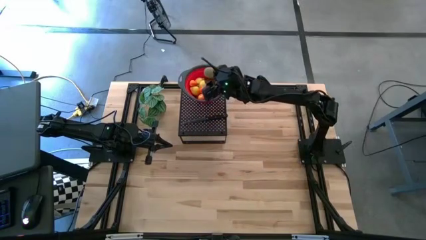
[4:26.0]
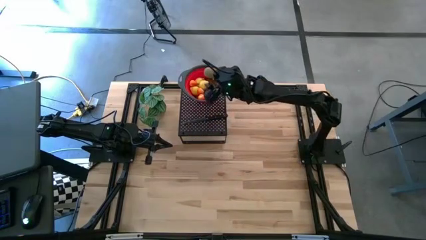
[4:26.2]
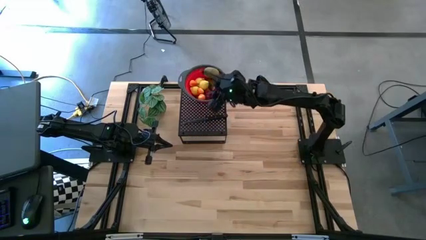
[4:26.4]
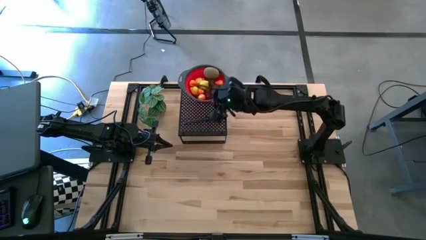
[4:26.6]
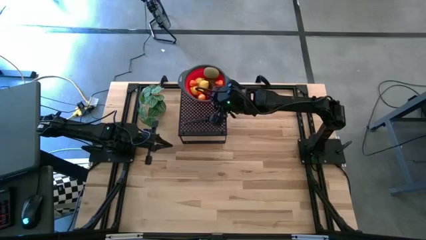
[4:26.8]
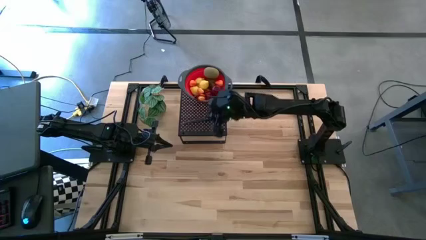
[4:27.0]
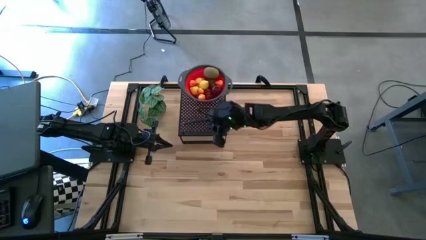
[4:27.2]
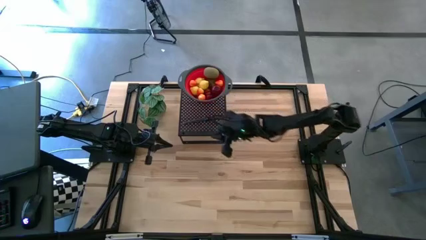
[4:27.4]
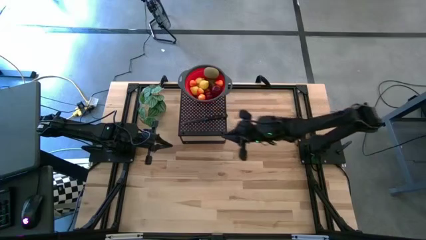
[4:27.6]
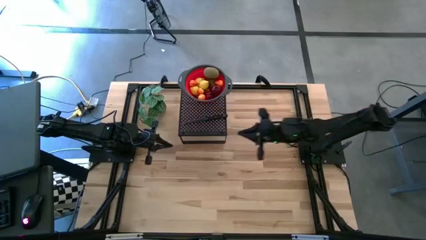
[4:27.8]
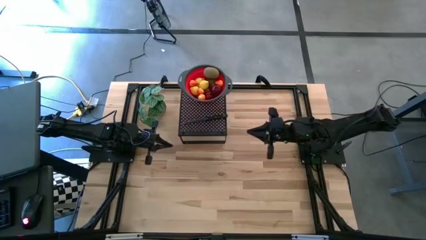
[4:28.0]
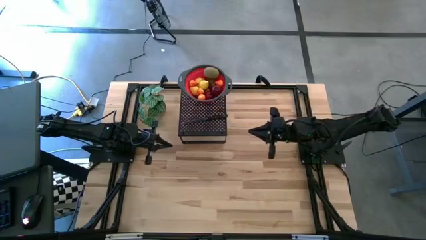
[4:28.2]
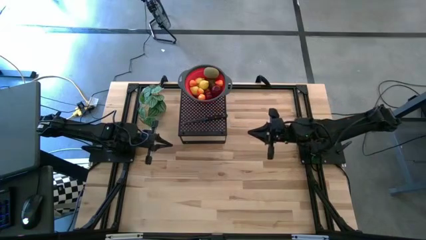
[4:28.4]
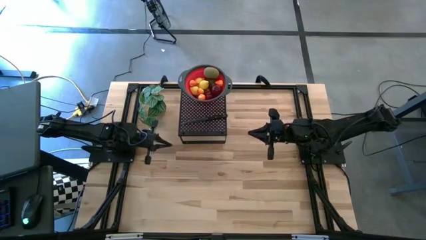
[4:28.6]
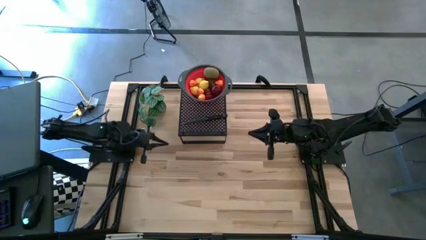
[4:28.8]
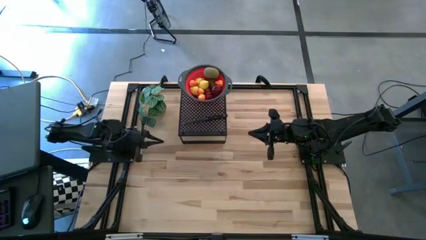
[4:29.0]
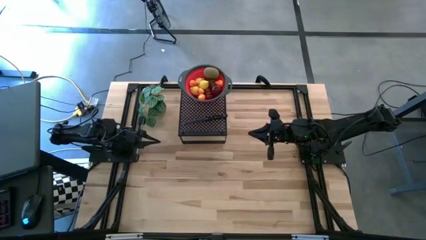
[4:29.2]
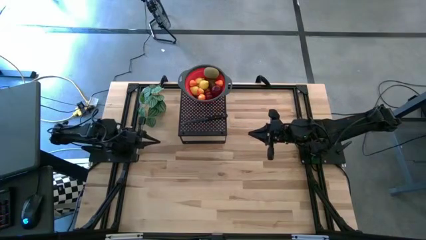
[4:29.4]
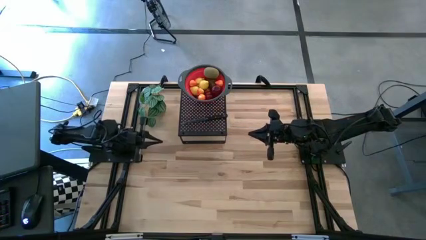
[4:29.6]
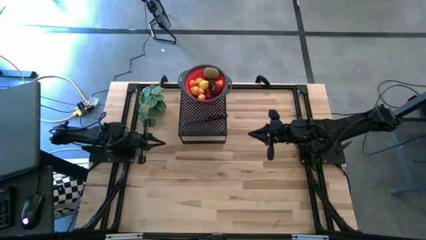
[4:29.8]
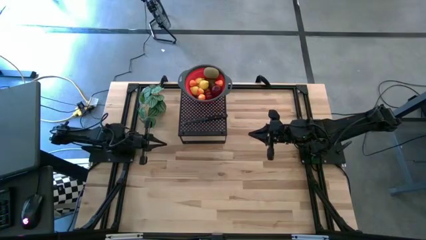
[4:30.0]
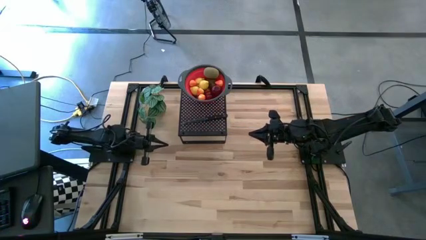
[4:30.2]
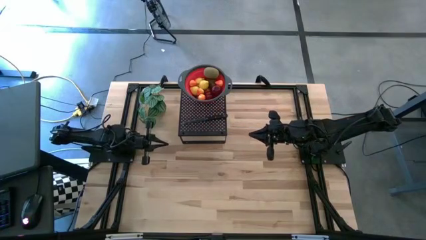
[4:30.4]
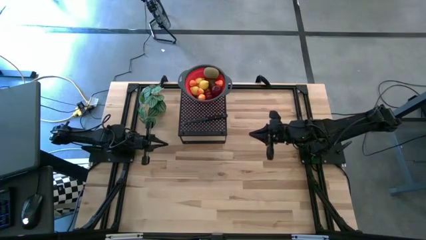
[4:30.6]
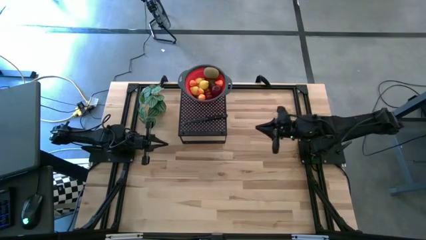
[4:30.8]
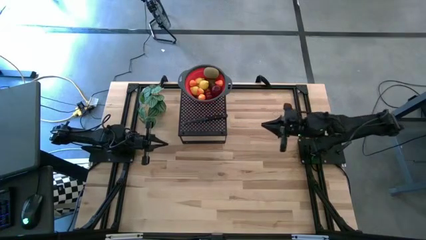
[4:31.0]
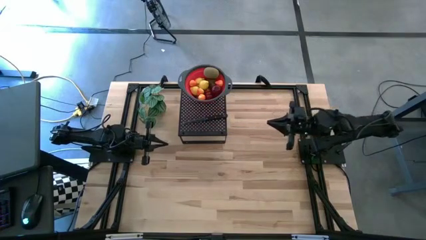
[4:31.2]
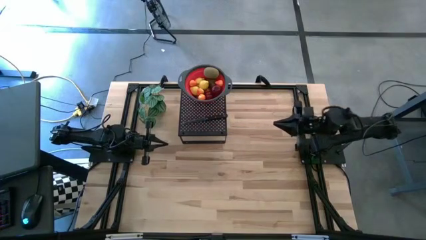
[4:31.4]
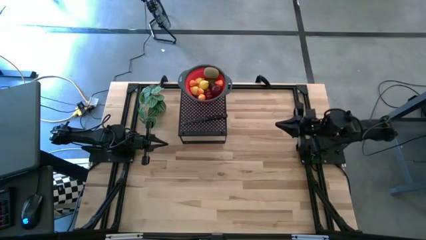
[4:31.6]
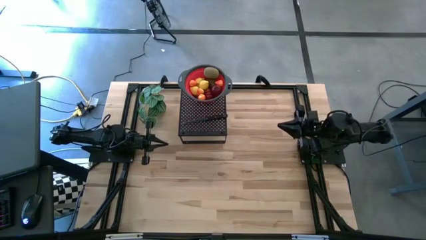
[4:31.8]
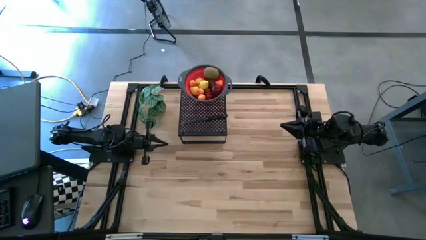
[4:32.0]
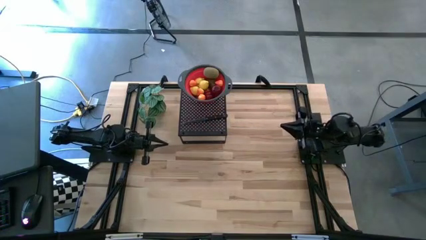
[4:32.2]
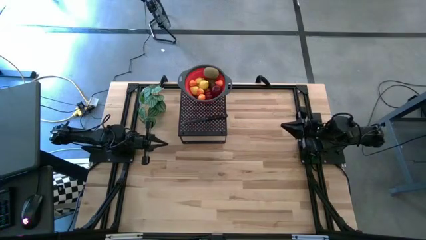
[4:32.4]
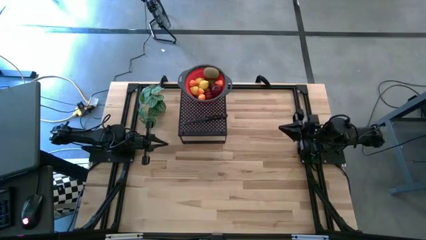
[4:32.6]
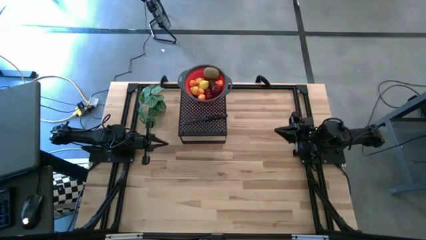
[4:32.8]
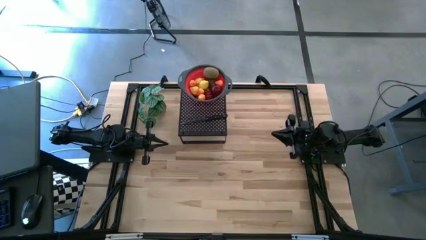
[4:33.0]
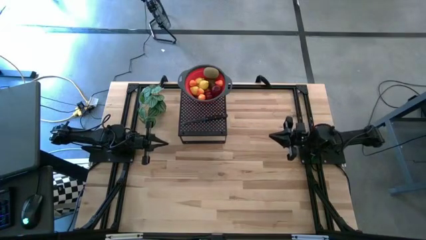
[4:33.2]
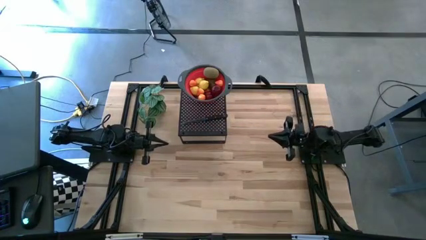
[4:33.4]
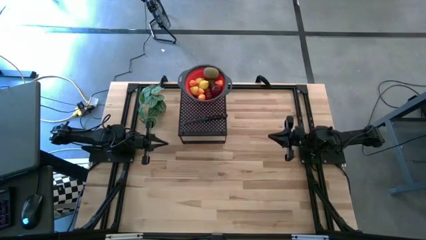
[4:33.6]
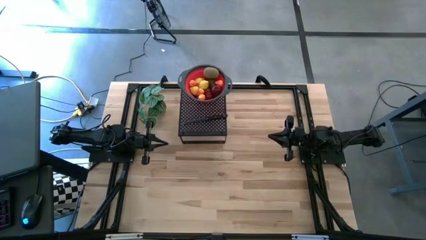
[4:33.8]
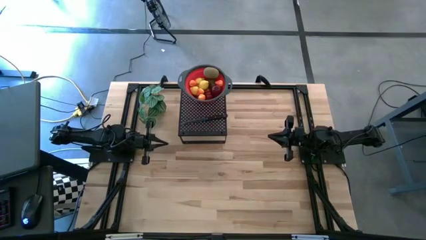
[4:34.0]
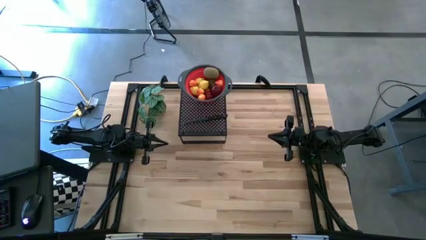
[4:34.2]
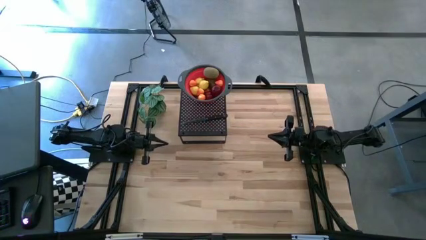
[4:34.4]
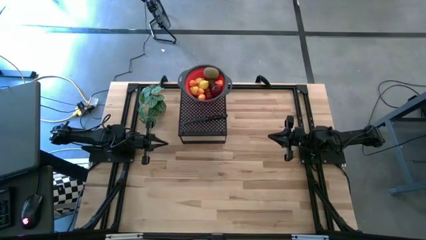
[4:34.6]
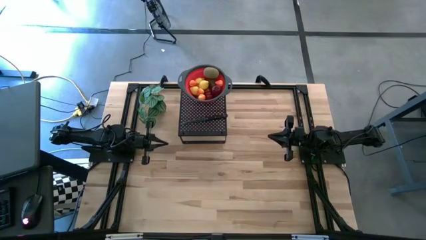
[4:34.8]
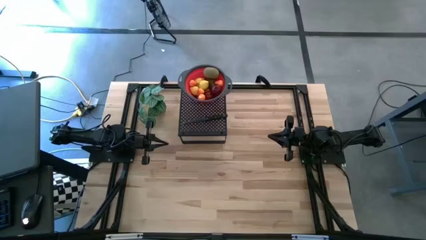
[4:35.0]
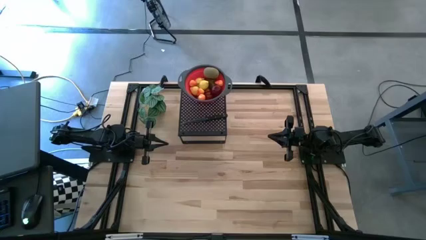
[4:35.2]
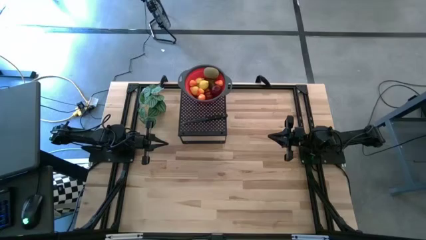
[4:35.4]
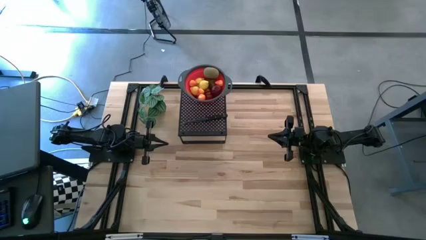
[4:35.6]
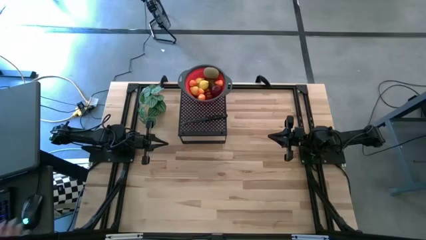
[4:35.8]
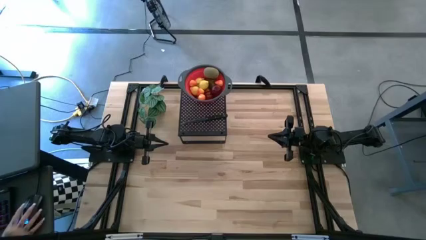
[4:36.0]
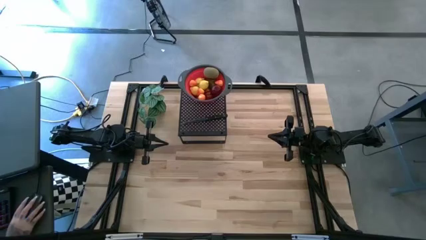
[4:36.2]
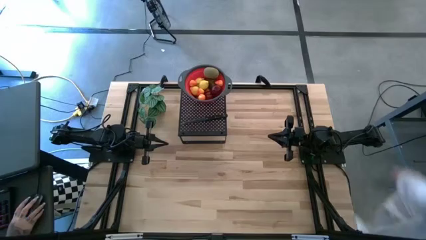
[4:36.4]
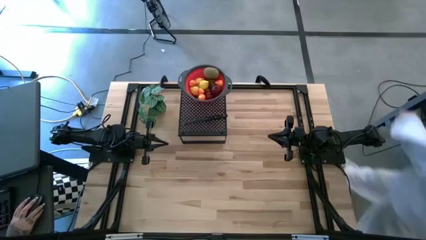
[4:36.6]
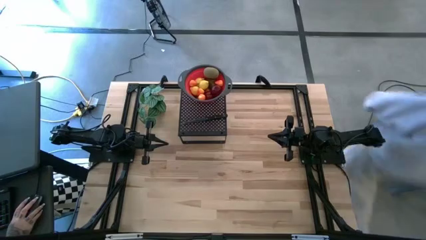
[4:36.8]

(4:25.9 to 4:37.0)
Task: Pick & Place Fruit
Return to home position

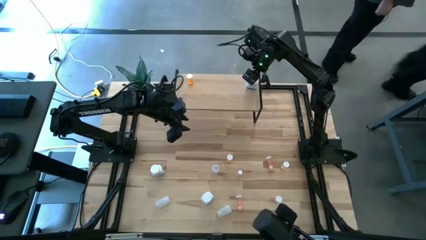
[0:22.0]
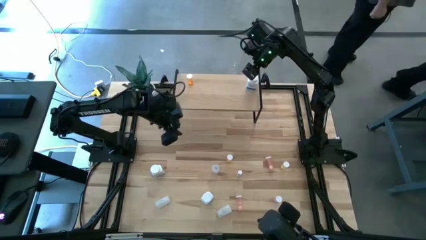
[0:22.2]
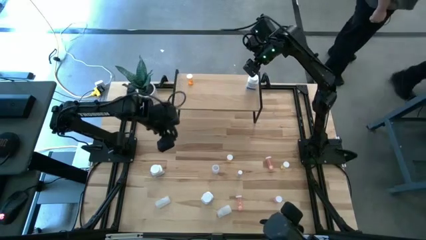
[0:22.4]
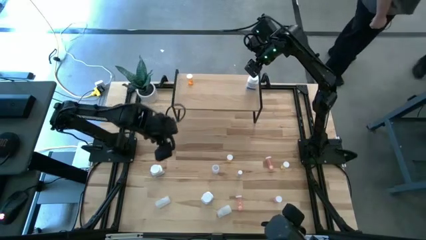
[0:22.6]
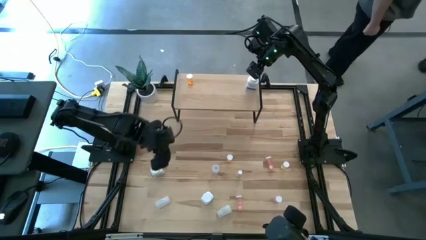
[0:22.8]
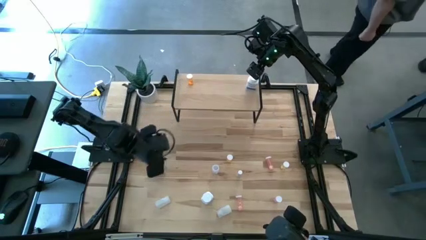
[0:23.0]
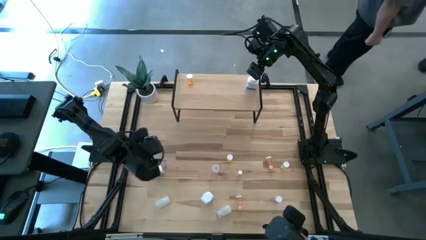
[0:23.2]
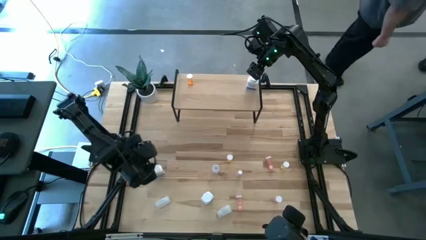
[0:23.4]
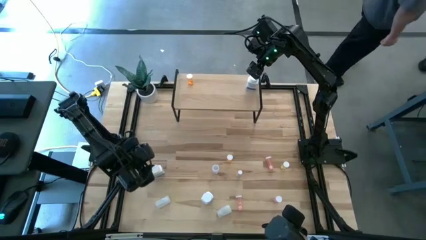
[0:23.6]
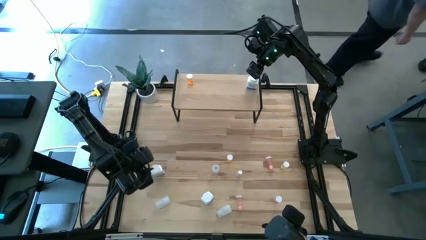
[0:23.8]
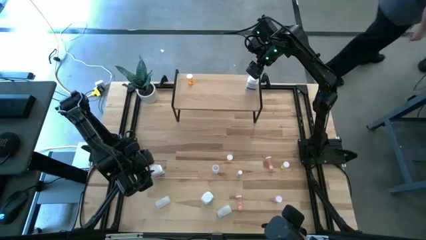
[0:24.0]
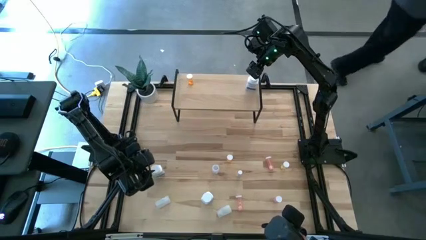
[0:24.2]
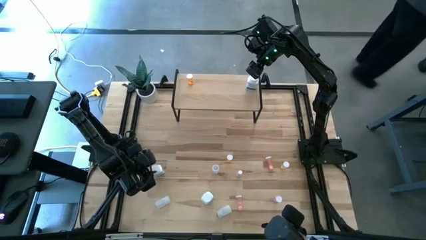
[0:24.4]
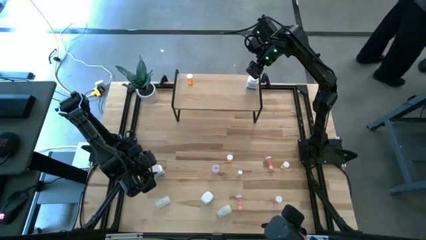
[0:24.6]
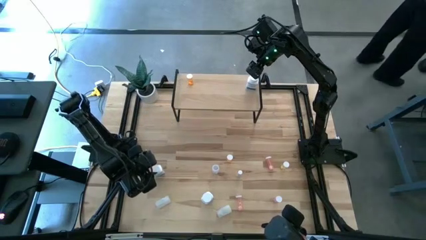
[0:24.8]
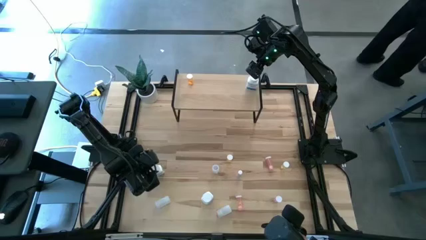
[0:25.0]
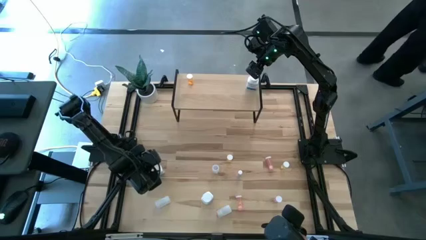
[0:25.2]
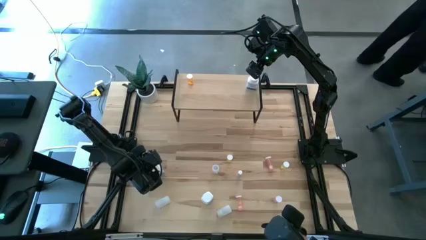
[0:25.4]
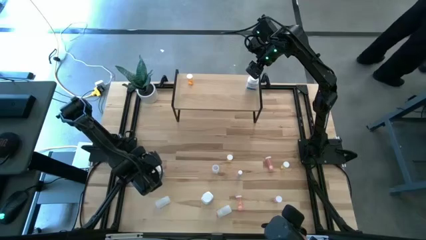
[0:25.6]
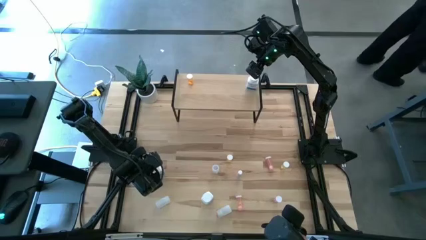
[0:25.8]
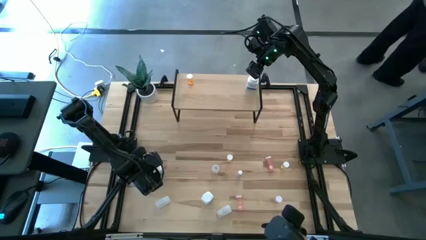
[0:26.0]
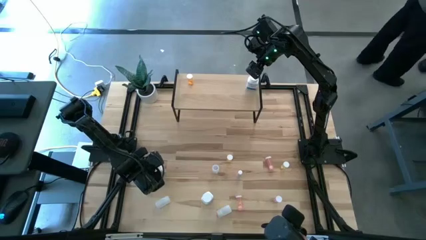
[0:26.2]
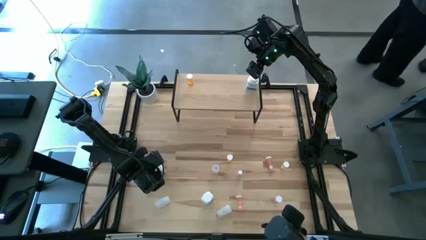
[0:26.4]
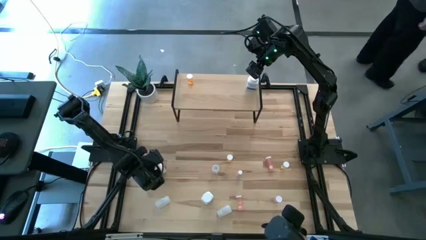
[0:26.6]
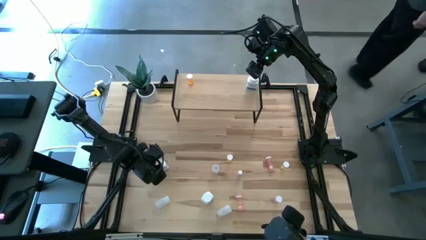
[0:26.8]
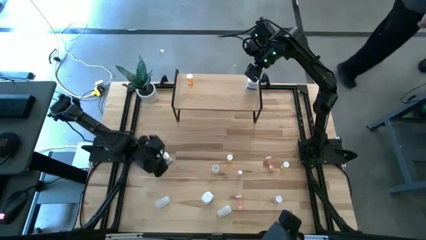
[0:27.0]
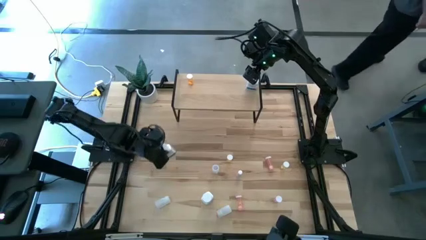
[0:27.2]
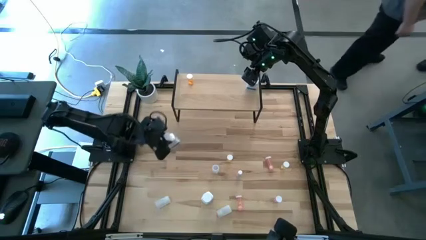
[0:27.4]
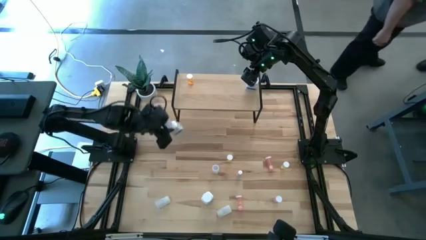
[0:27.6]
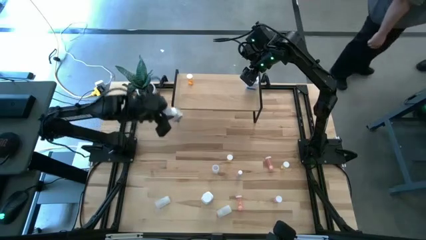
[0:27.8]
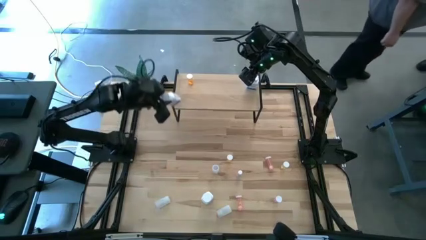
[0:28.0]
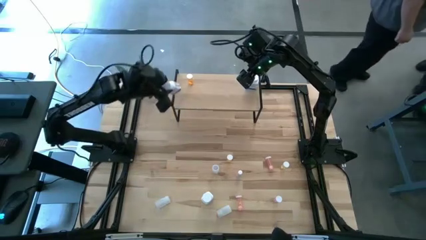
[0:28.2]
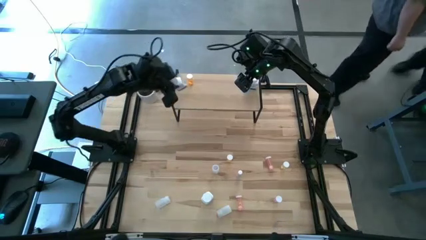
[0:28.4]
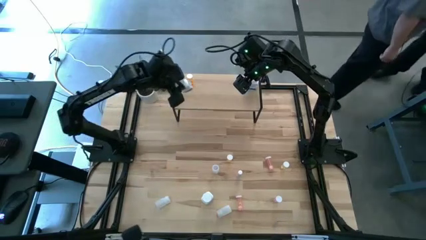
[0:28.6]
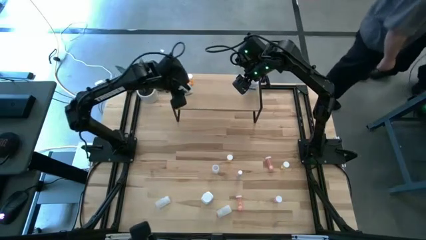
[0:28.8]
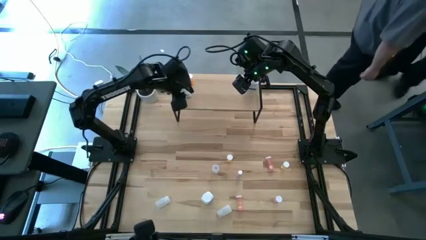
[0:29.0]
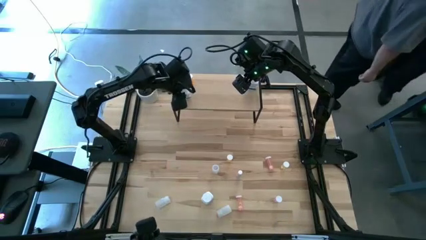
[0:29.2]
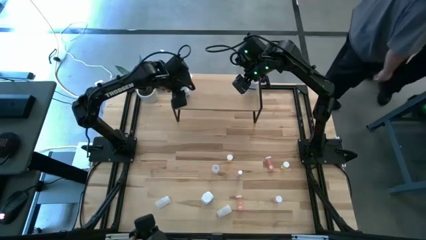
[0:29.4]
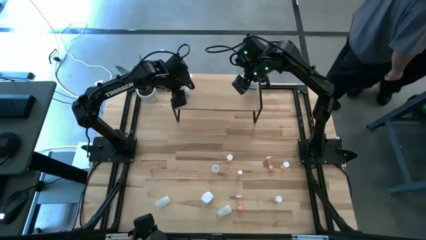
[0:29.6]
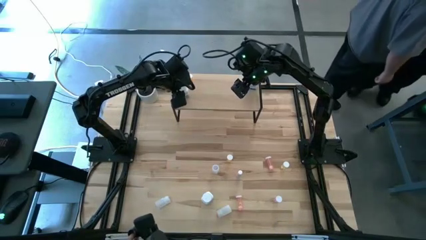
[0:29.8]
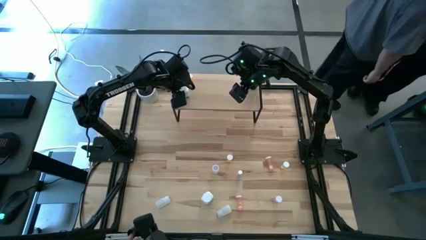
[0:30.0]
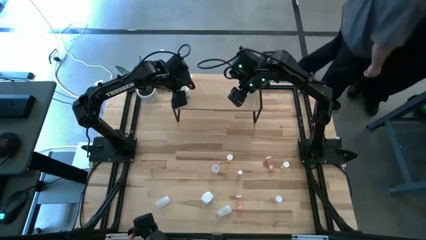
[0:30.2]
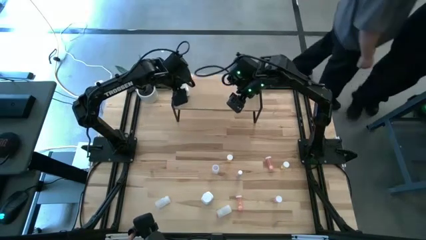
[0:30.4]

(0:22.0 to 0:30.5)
Task: Pick and place medicine bottles onto shelf by color
Put the left white supplement bottle on the shelf
